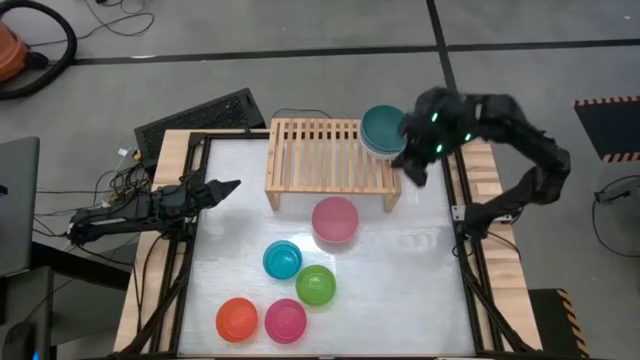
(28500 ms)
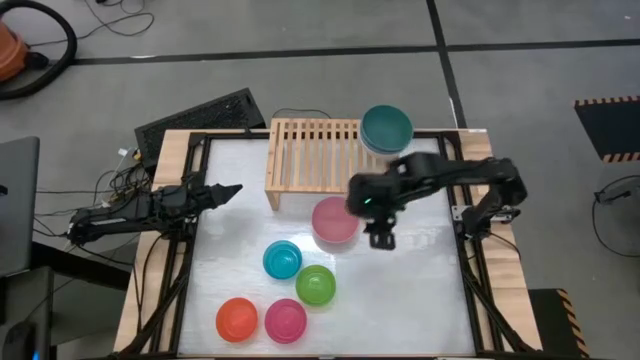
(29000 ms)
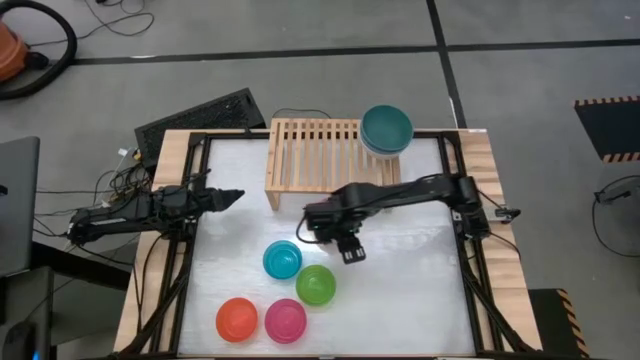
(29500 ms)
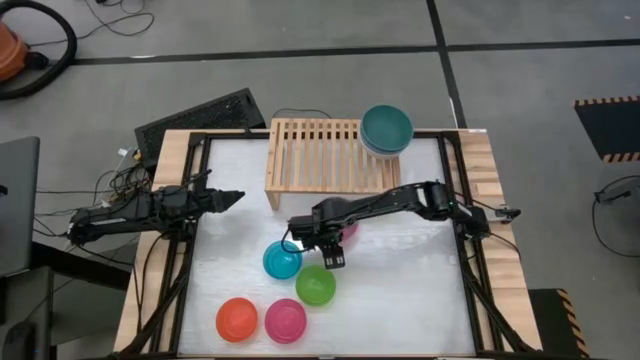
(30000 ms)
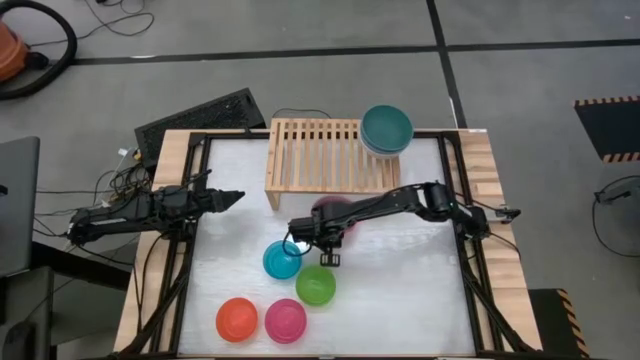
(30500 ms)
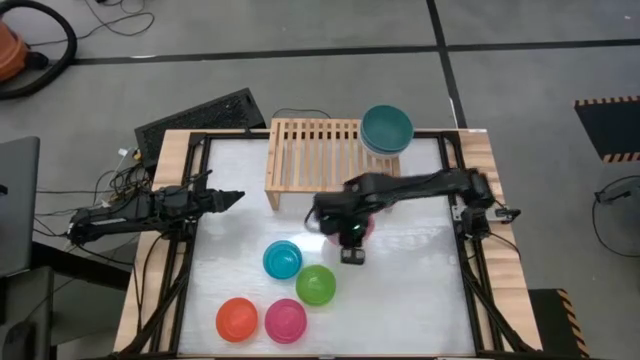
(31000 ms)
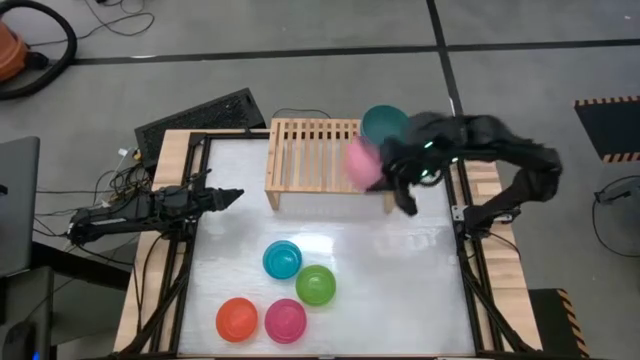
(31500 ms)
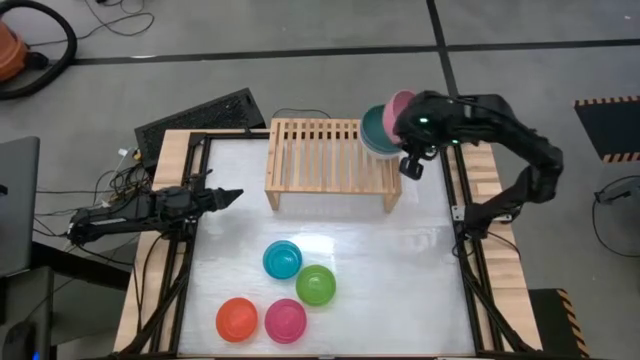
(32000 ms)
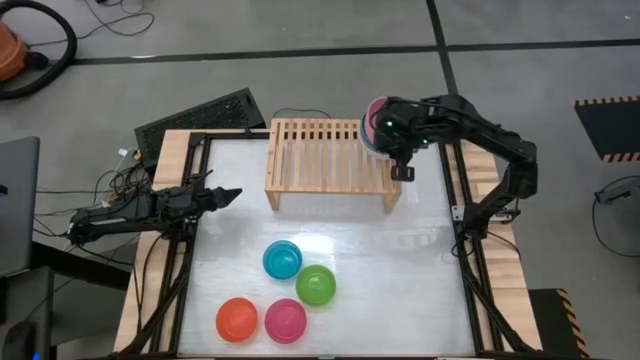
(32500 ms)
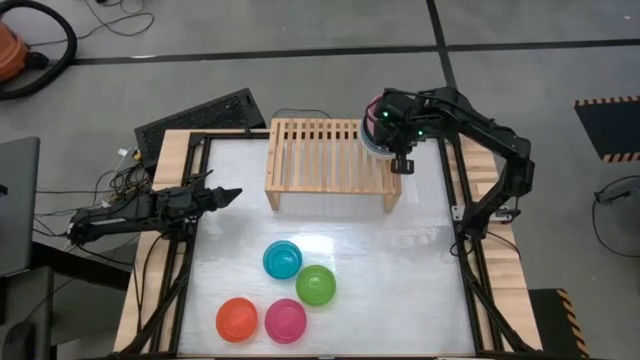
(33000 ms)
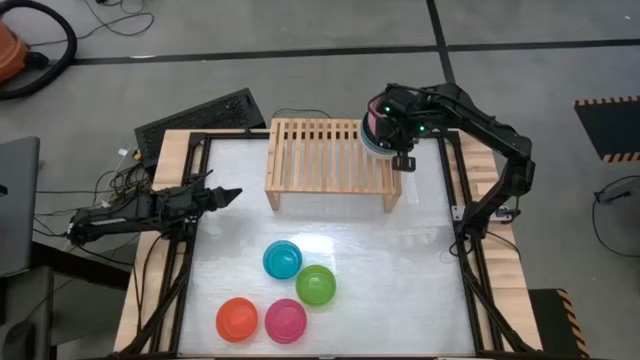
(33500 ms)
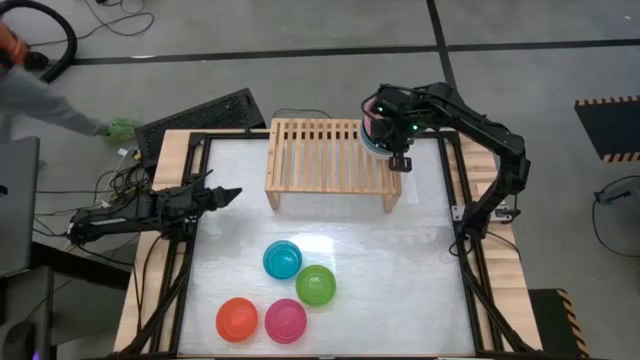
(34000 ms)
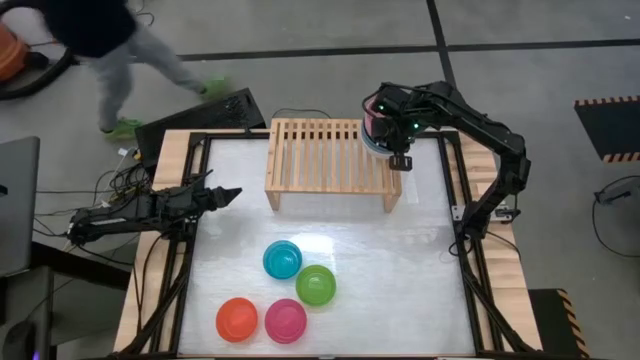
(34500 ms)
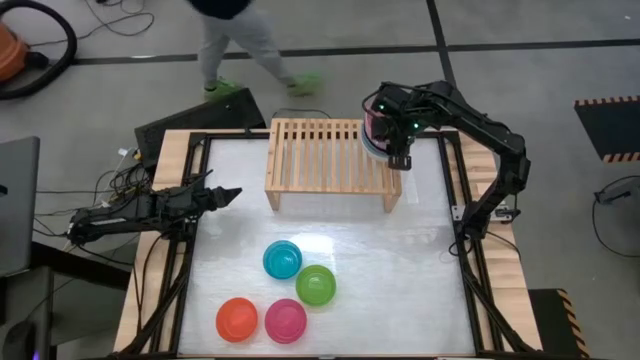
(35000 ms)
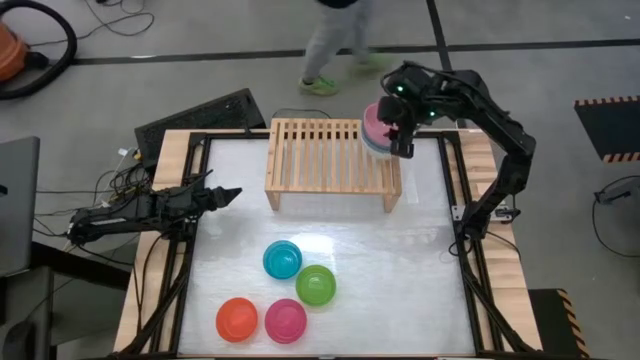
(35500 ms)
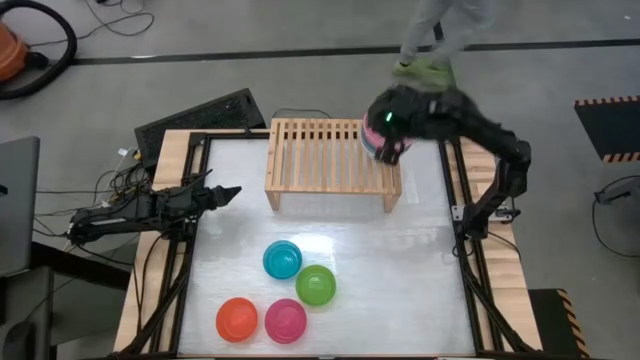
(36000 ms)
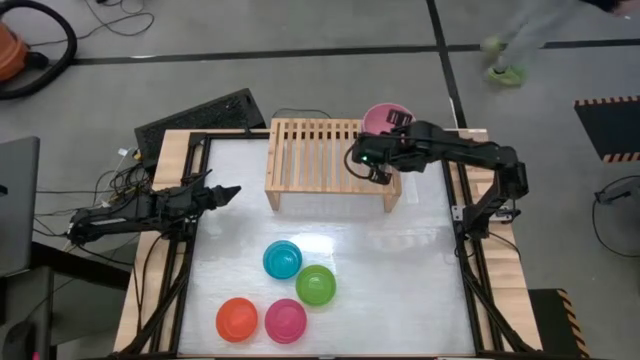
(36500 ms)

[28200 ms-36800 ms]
Task: Place and stack bowls onto a shelf
Stack the pink bowl on top of the dark green bowl on the shelf

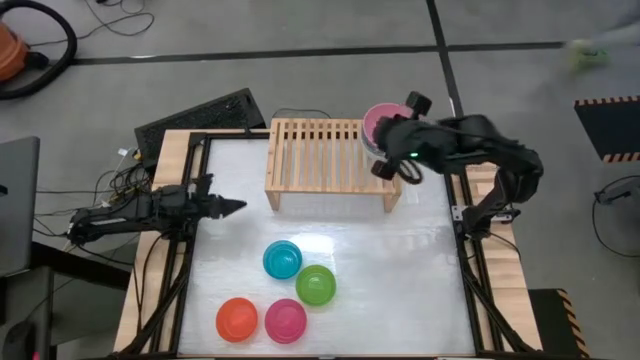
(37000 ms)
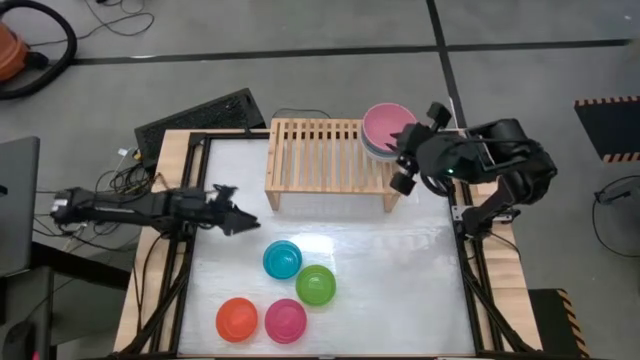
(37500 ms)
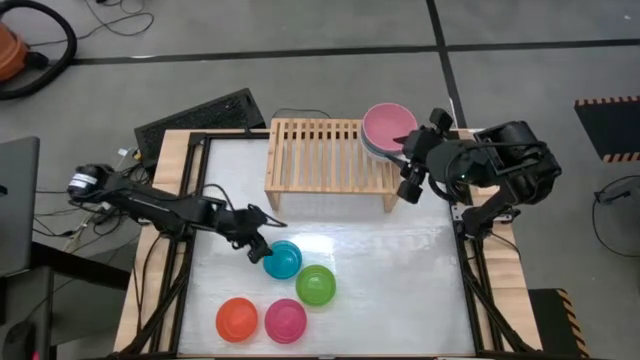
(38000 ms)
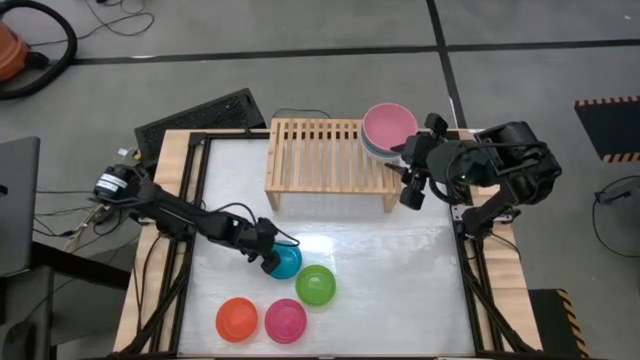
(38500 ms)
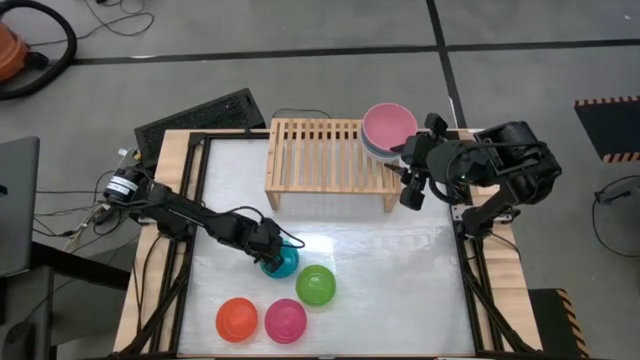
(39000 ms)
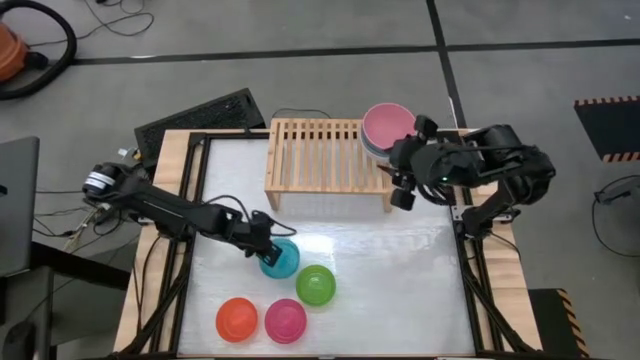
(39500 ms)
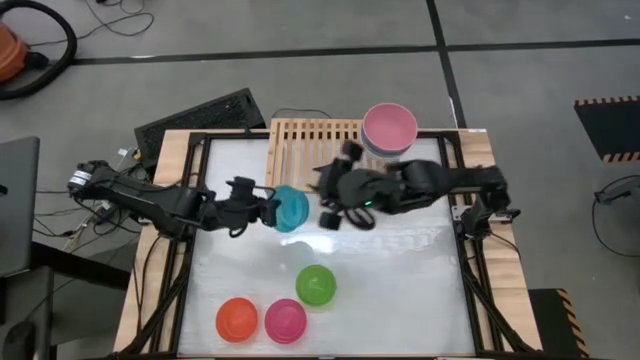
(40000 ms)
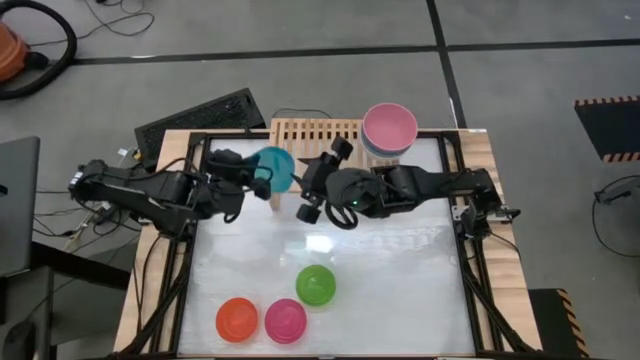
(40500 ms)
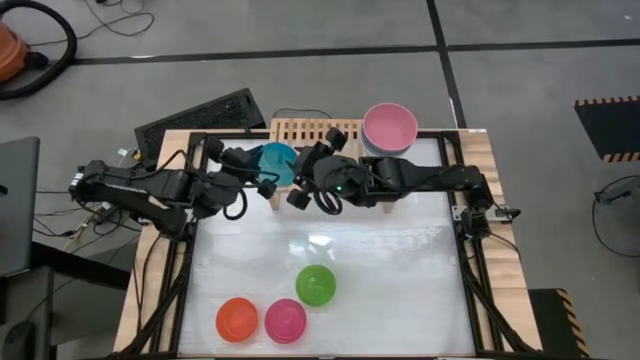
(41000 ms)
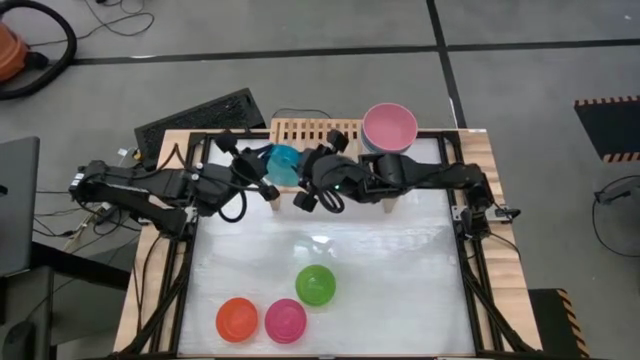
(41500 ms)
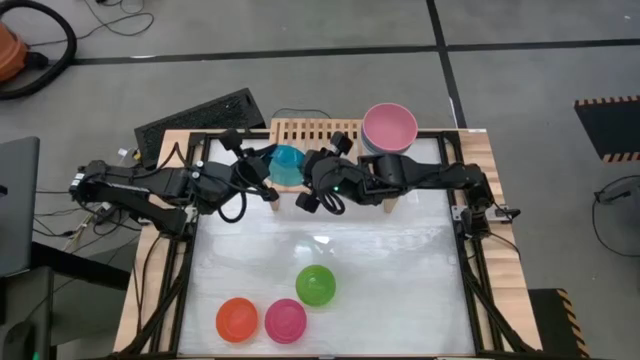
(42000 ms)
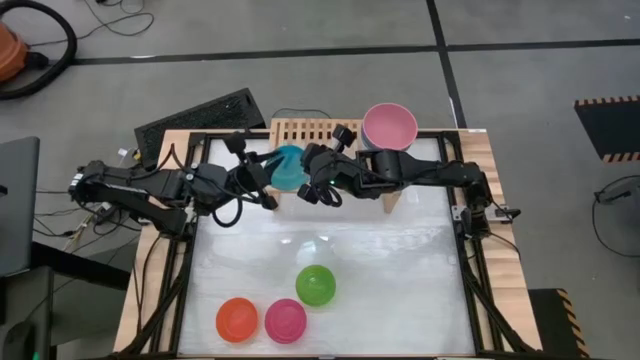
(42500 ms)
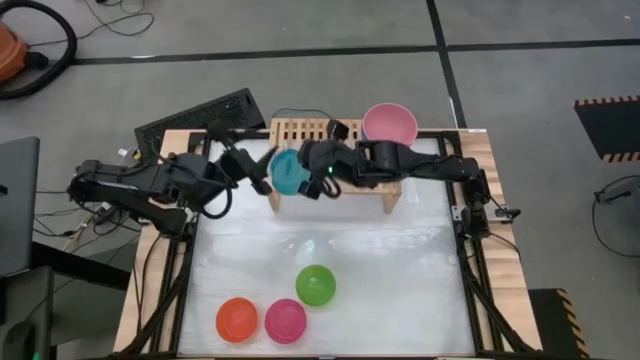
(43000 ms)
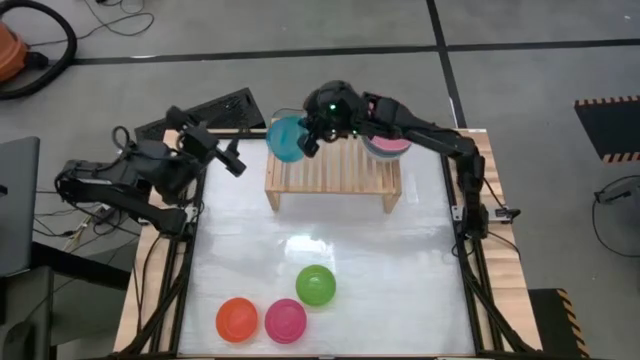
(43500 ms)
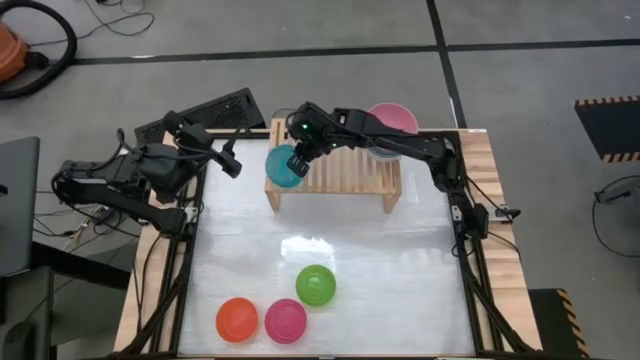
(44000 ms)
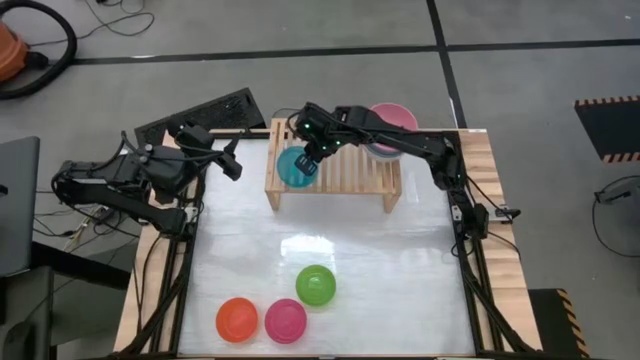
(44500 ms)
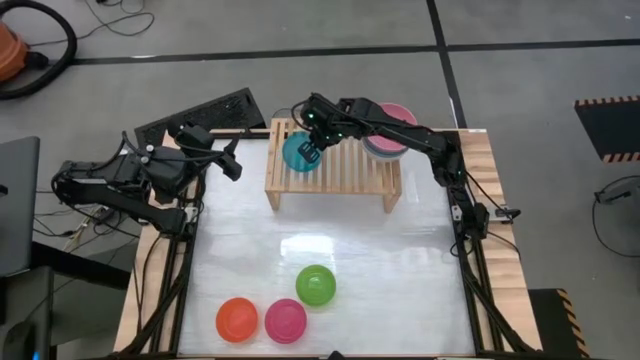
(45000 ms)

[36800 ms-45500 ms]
Put the light blue bowl on the shelf

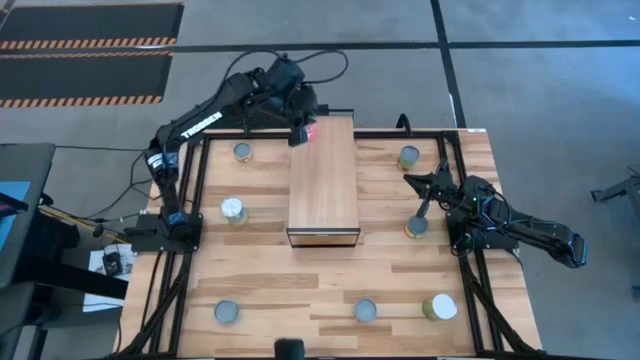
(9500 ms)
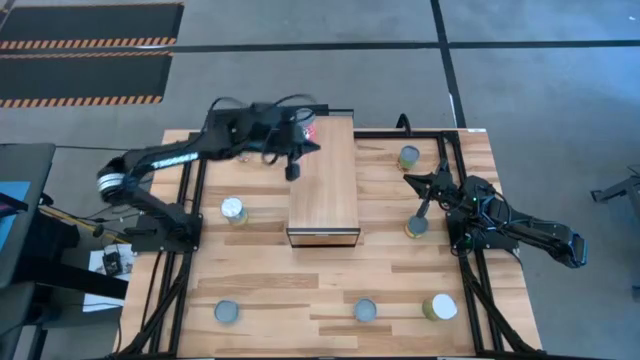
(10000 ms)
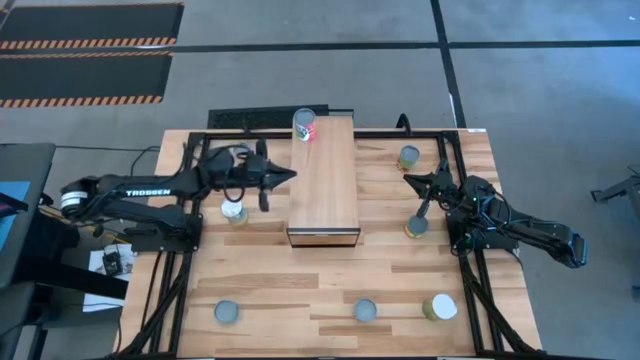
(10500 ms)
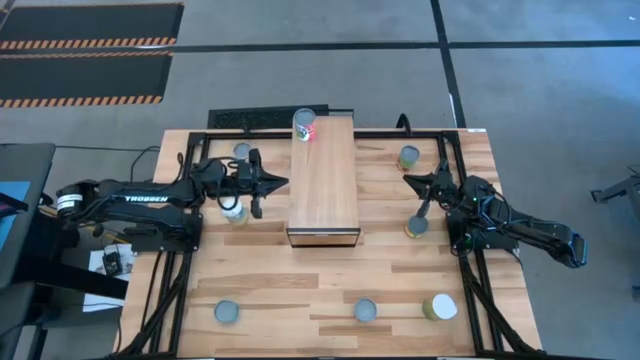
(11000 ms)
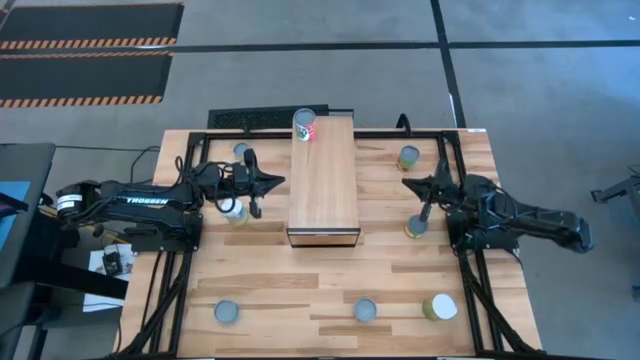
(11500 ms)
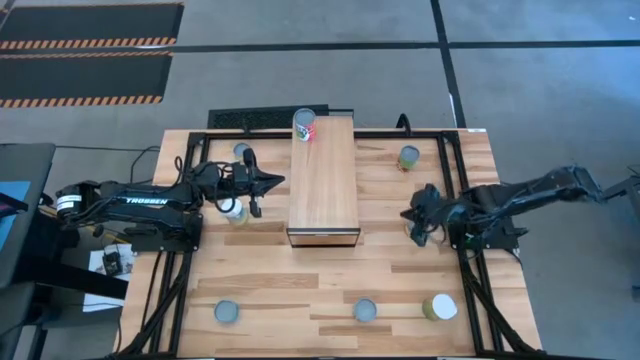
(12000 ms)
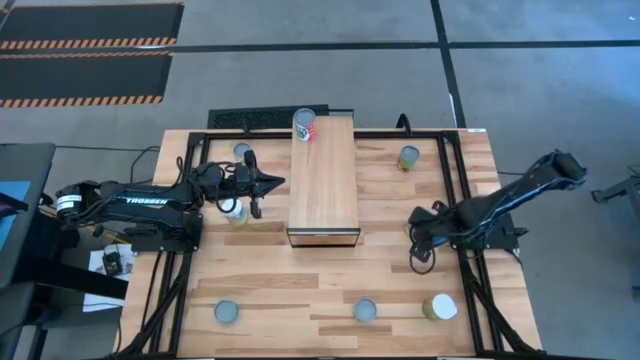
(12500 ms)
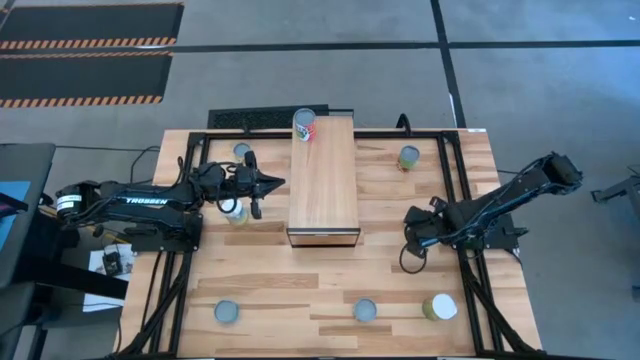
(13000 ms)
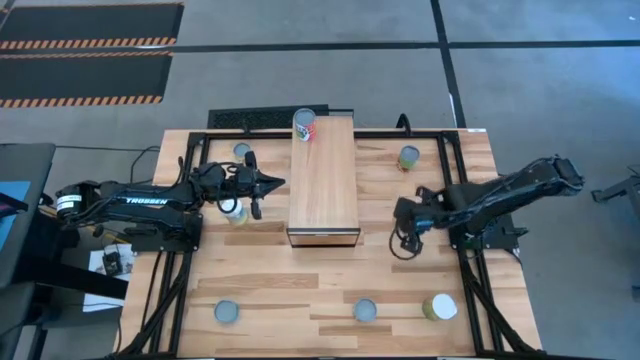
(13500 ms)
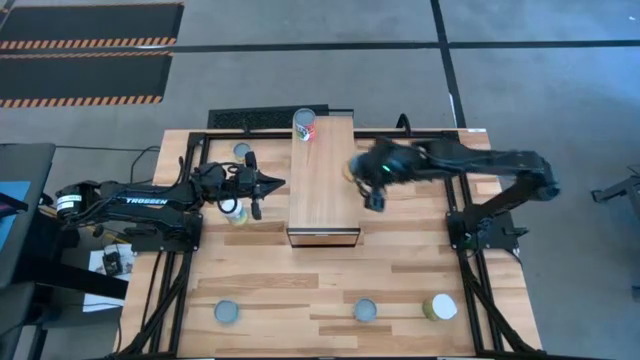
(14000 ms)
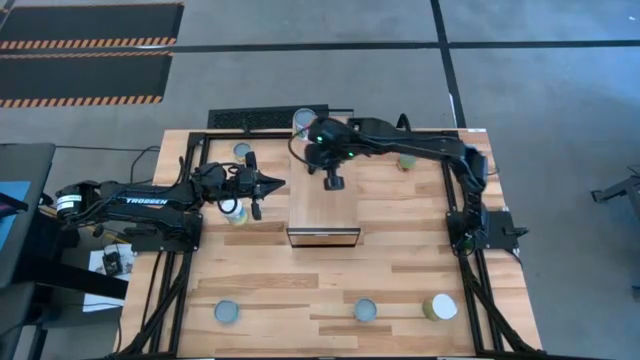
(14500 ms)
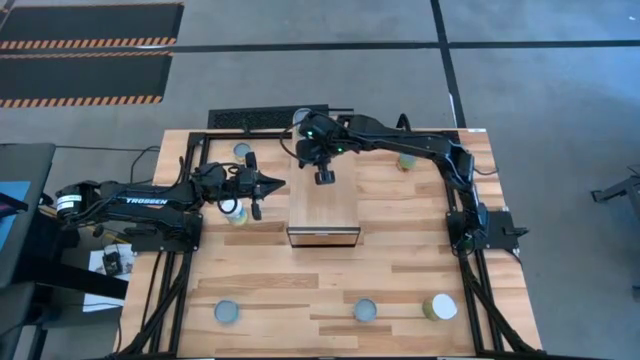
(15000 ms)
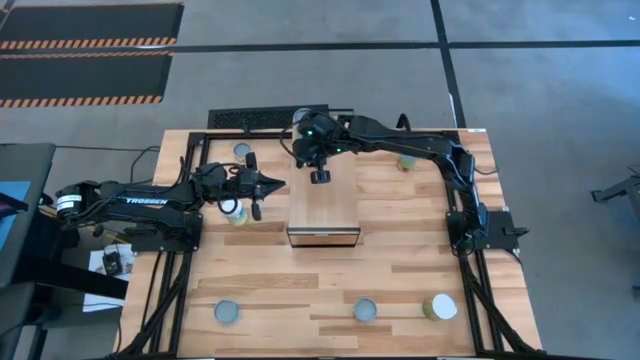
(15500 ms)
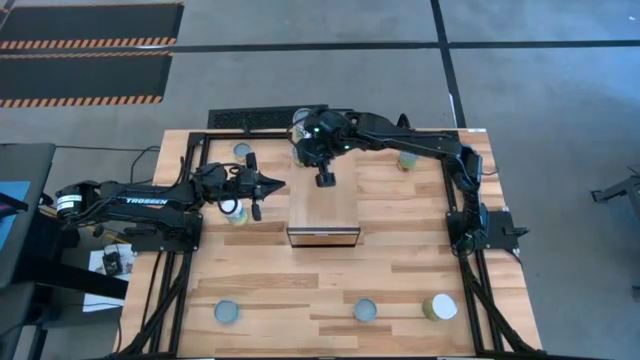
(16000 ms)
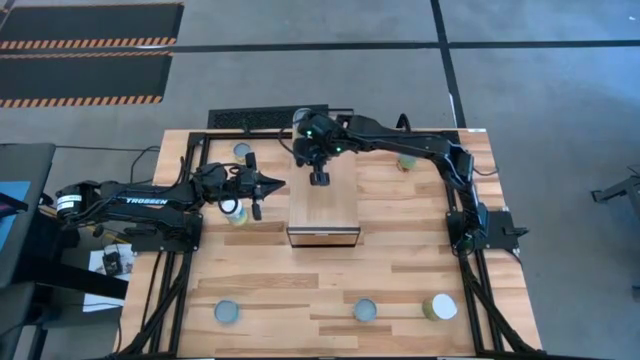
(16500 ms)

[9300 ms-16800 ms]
Task: Pick and place cans onto a shelf
Put the canned peaches on the shelf
